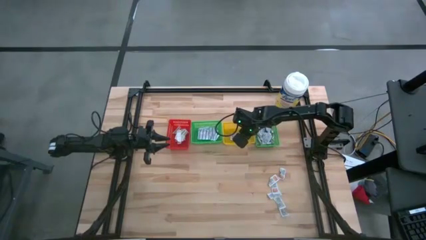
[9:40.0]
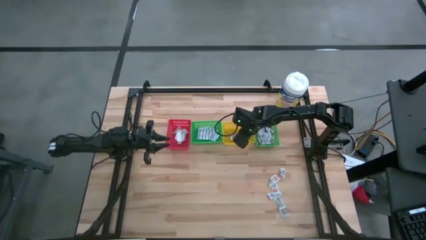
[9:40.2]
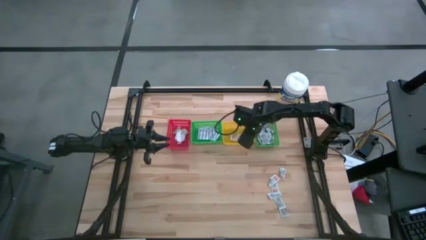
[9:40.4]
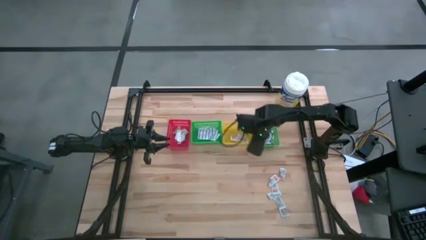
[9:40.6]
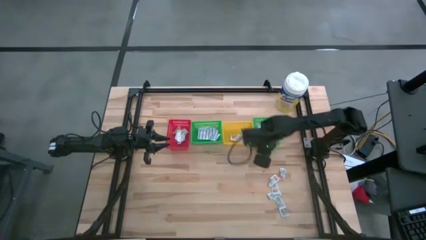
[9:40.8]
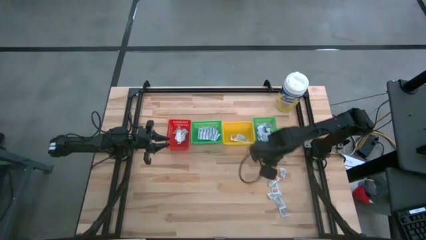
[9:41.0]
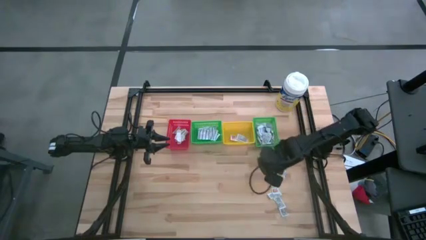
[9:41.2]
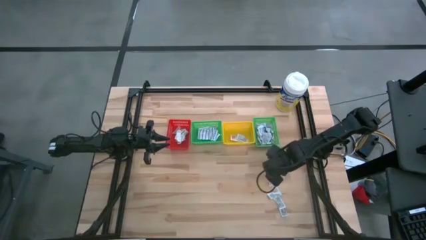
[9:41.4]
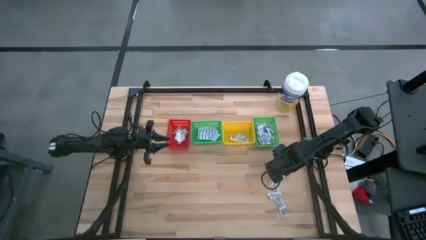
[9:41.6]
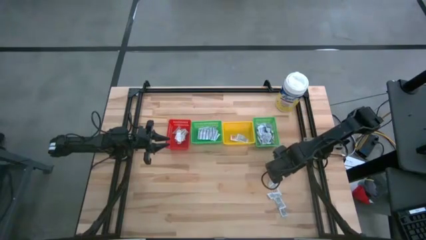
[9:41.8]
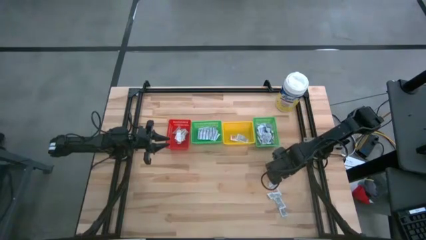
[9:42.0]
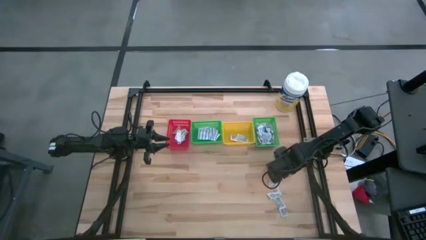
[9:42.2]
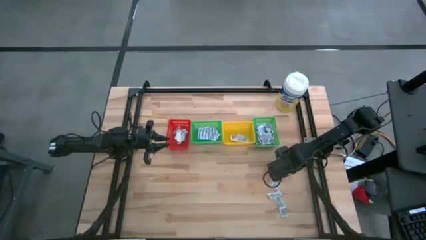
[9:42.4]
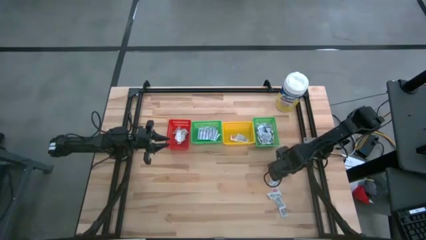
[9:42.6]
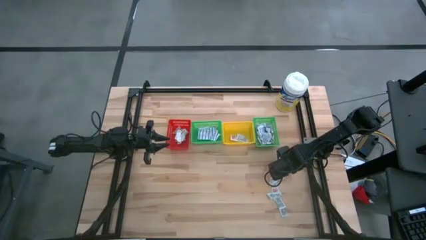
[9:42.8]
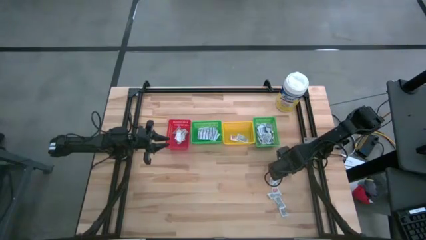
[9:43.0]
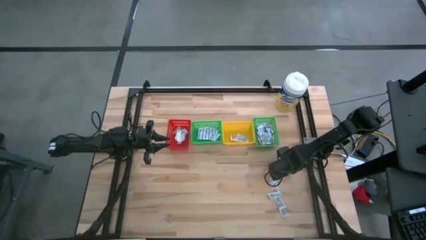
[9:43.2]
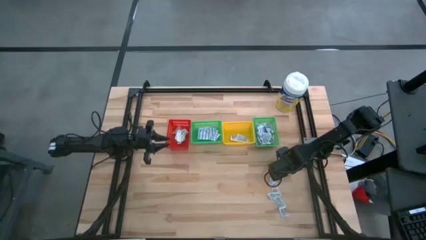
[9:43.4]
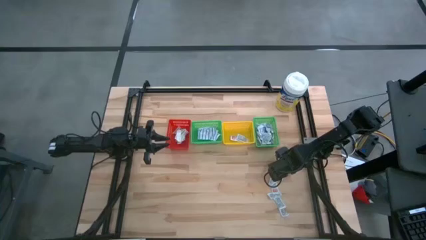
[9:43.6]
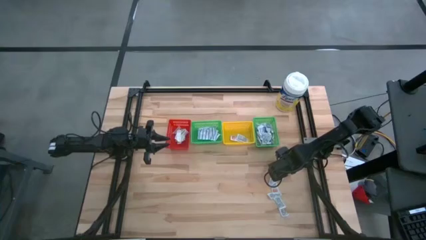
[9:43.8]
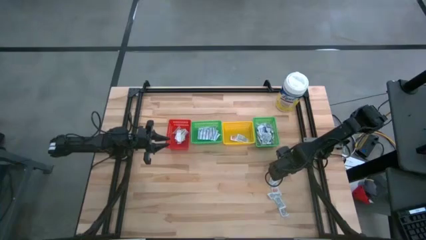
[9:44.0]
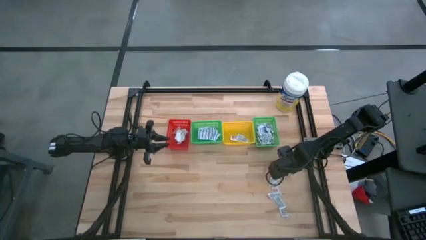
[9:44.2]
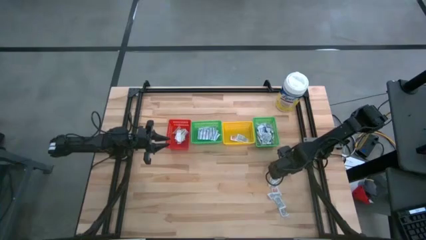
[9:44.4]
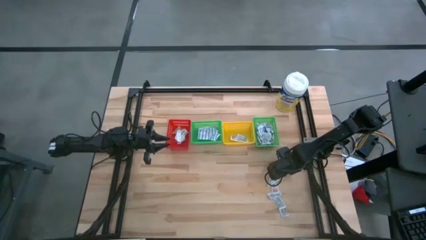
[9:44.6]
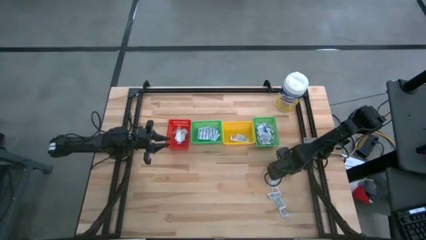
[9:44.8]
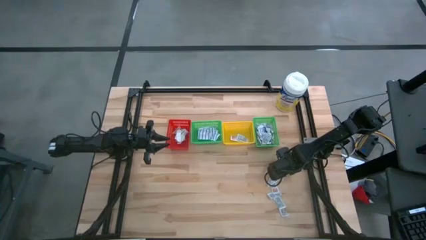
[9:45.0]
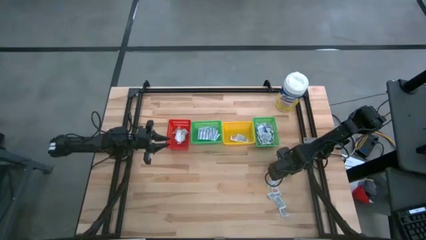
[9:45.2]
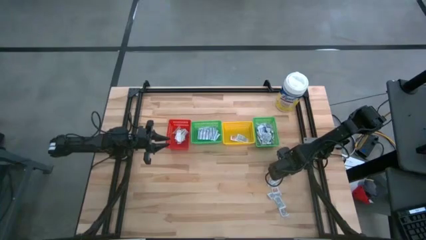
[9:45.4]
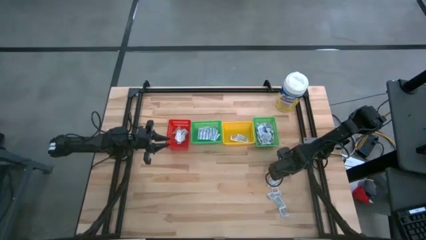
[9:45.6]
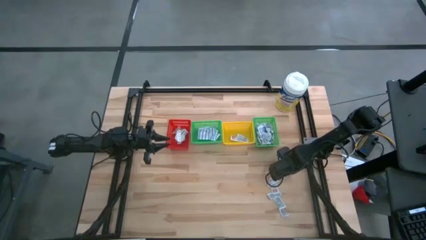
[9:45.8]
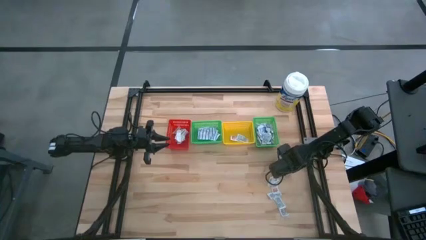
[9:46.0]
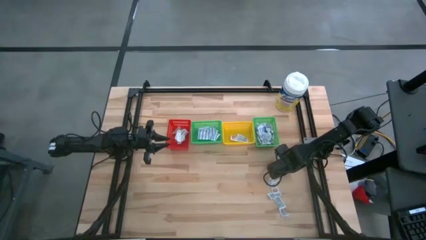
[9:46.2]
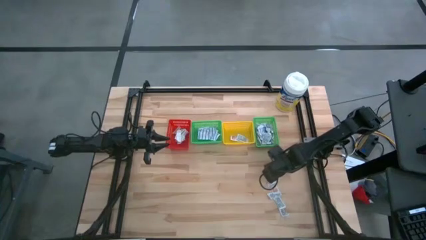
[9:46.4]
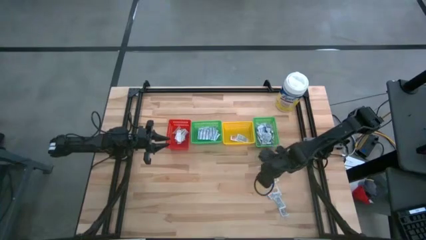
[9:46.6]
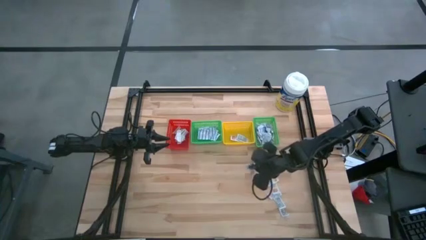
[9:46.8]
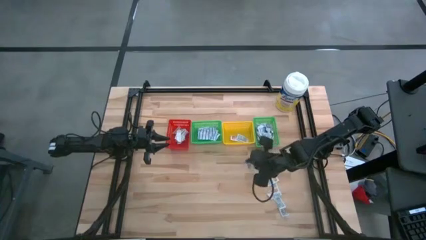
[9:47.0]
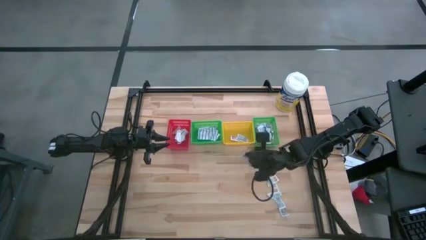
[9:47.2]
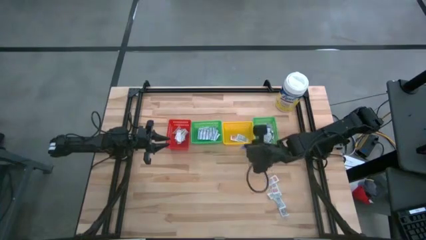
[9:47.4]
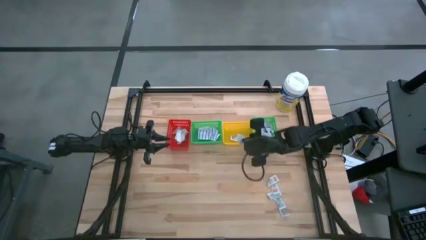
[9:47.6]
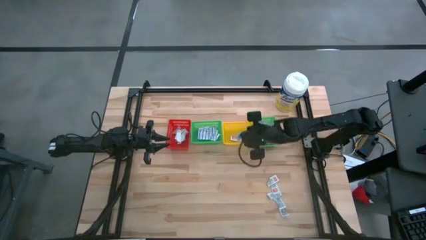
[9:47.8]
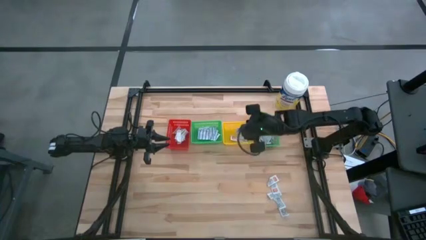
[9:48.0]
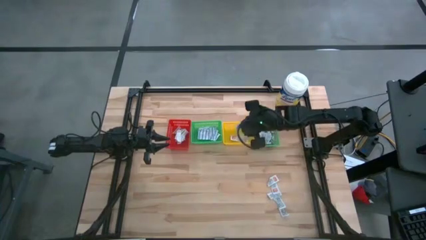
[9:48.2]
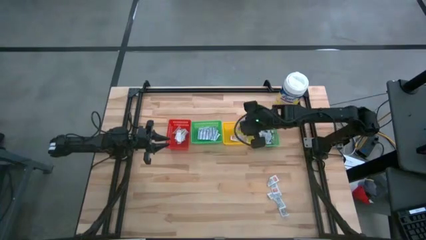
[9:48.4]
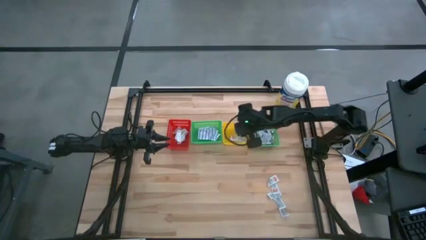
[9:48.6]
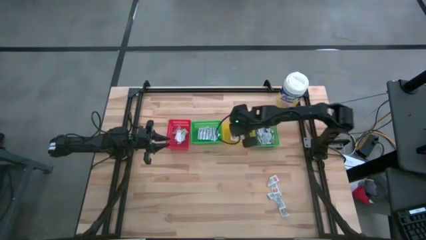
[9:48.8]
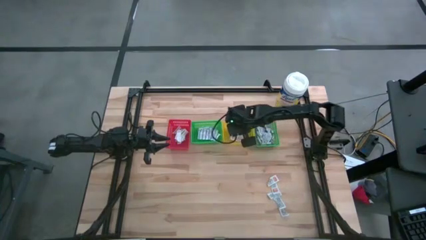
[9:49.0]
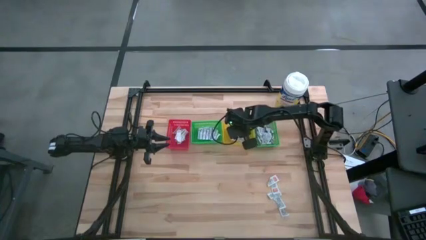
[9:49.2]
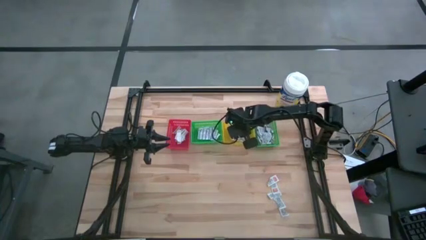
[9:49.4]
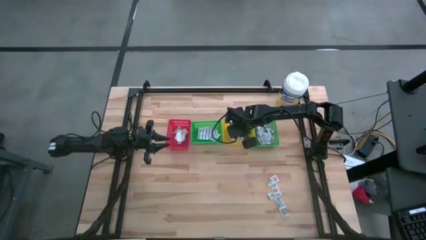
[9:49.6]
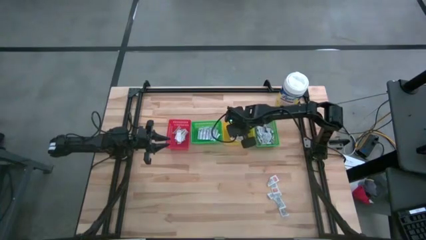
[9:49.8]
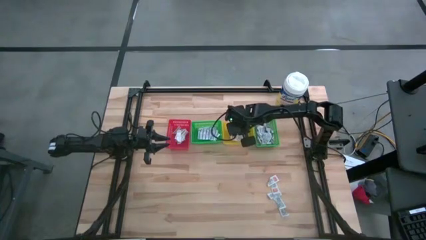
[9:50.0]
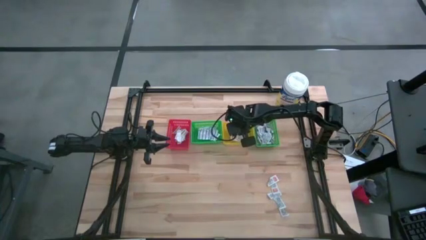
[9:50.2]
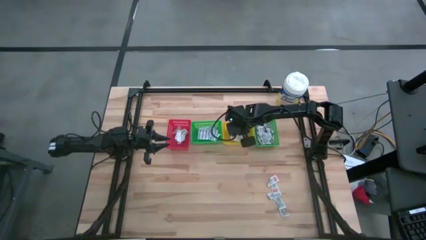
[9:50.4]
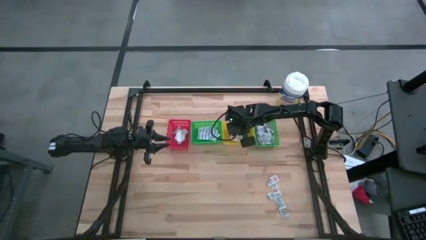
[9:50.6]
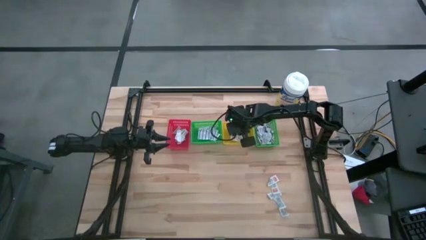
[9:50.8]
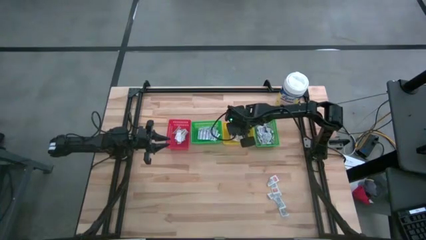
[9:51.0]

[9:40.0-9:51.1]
Task: Pick & Place First Aid Supplies
Put the orange ointment pack into the yellow bin
